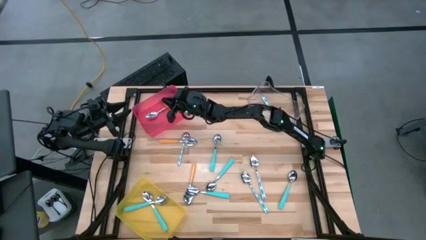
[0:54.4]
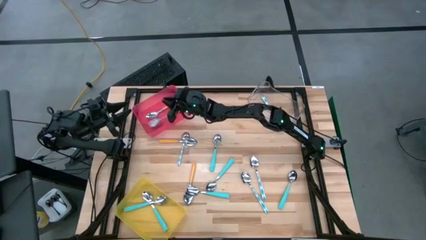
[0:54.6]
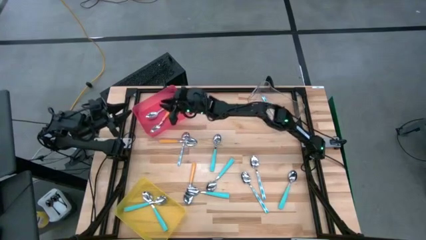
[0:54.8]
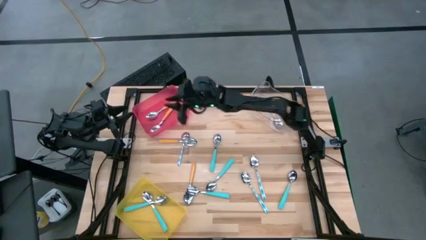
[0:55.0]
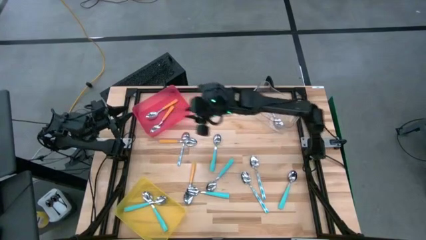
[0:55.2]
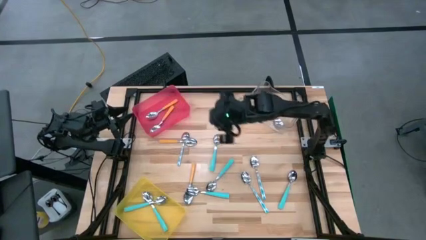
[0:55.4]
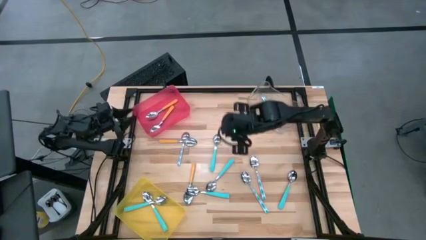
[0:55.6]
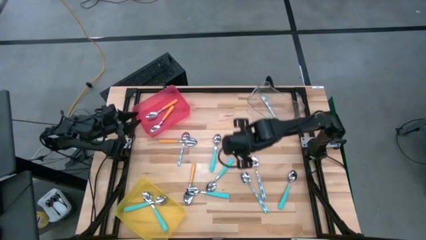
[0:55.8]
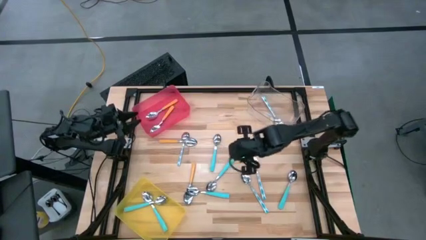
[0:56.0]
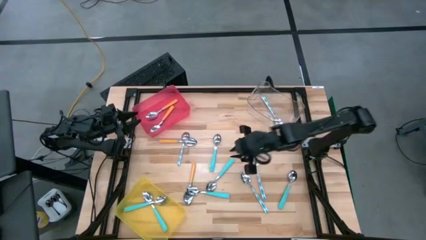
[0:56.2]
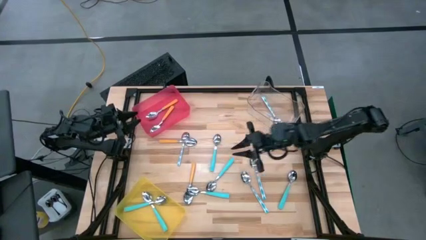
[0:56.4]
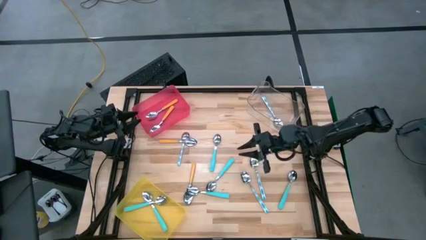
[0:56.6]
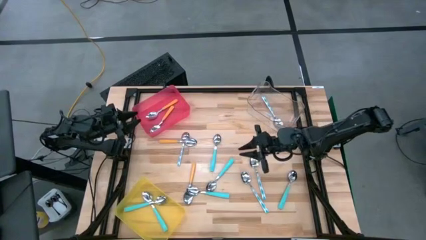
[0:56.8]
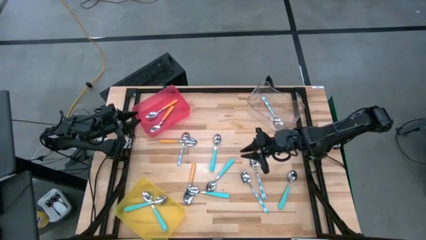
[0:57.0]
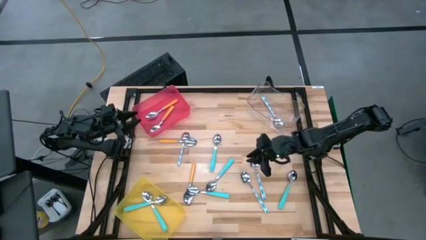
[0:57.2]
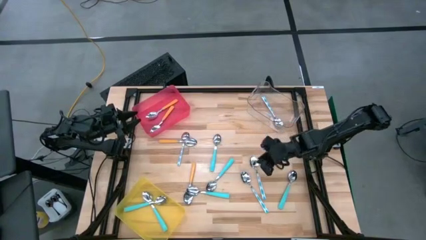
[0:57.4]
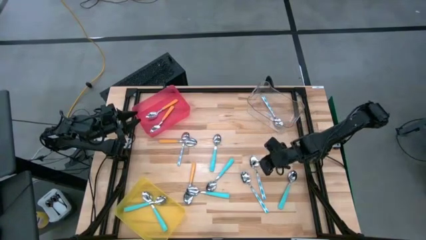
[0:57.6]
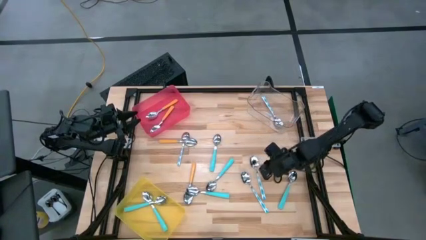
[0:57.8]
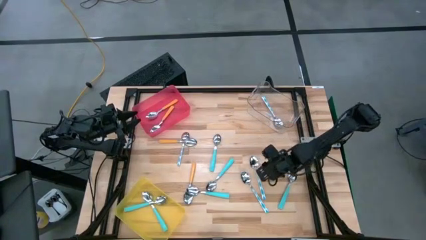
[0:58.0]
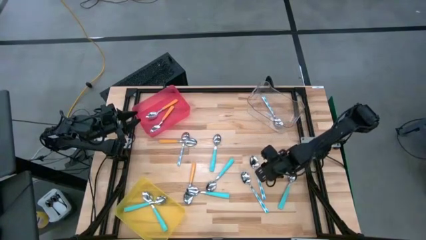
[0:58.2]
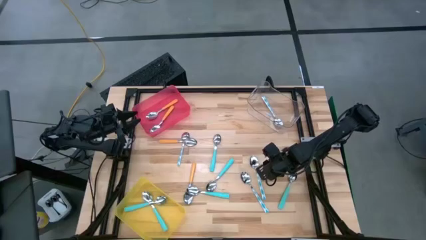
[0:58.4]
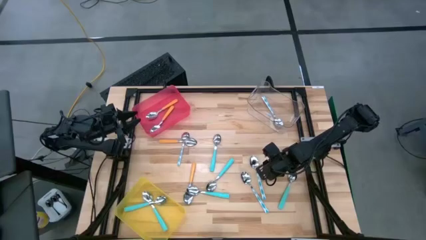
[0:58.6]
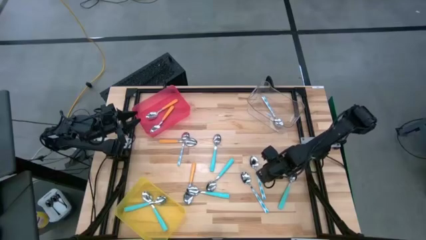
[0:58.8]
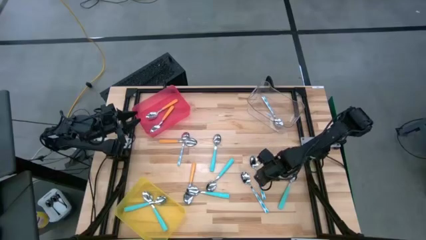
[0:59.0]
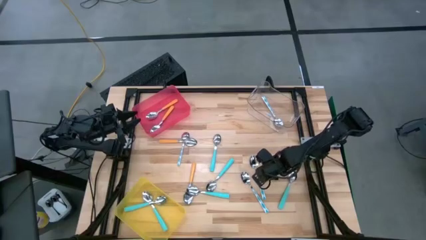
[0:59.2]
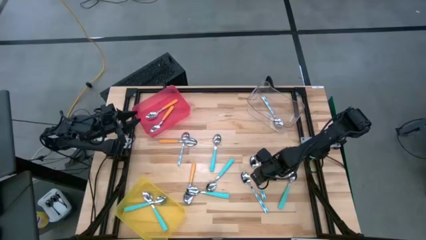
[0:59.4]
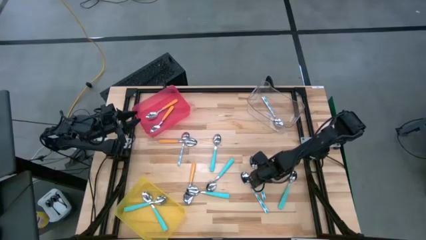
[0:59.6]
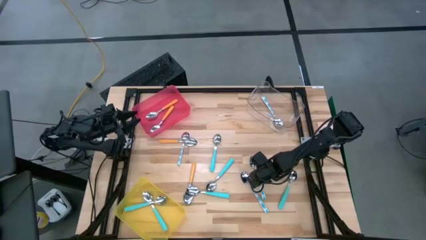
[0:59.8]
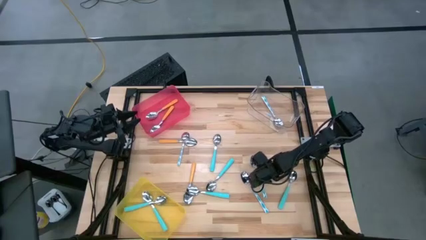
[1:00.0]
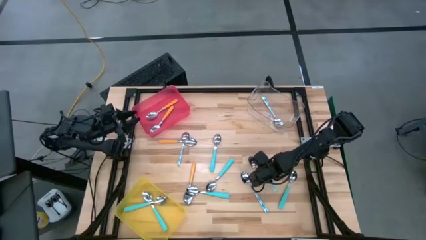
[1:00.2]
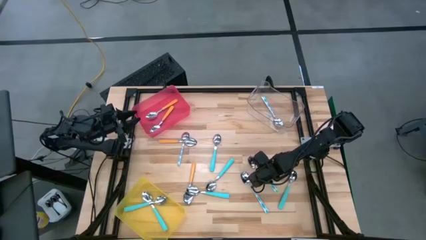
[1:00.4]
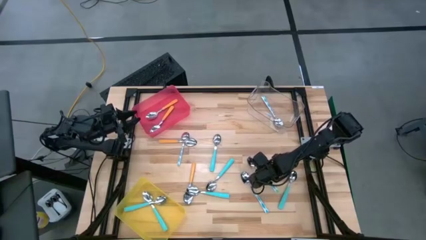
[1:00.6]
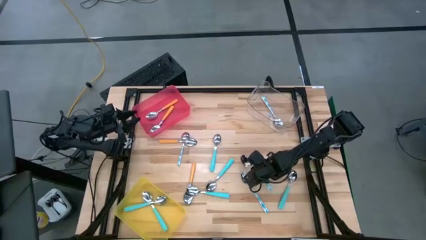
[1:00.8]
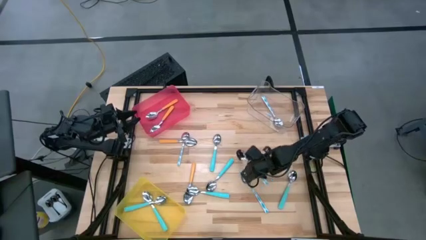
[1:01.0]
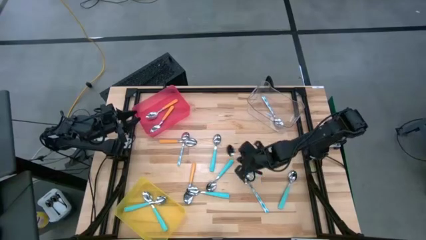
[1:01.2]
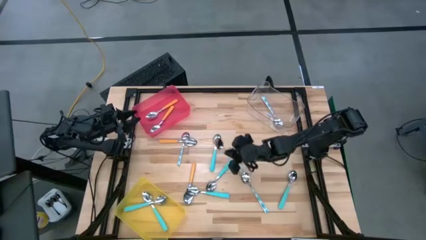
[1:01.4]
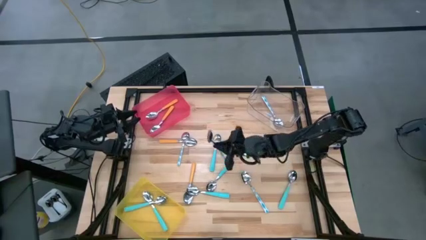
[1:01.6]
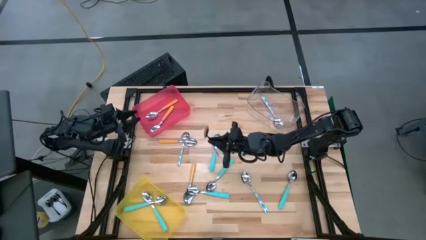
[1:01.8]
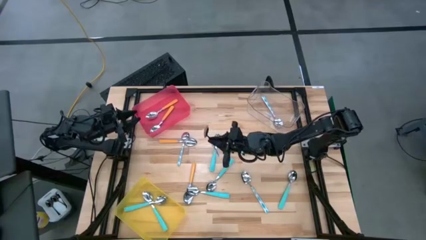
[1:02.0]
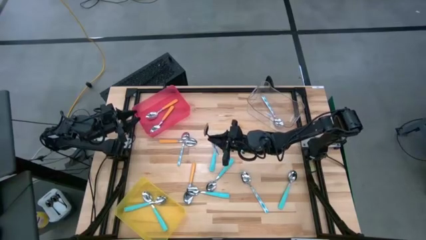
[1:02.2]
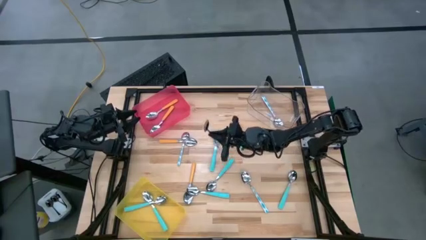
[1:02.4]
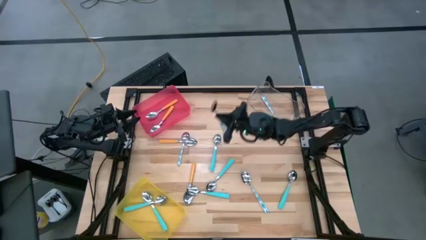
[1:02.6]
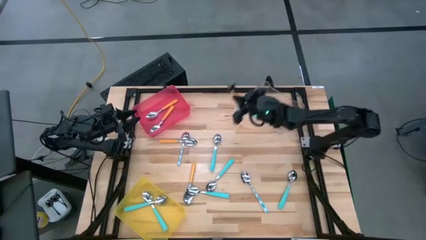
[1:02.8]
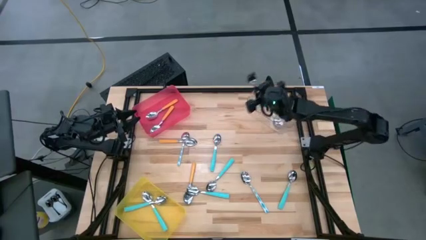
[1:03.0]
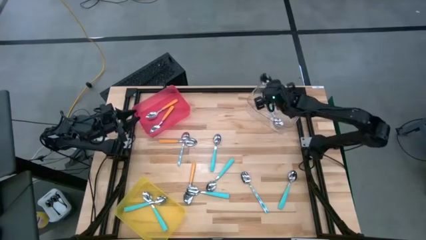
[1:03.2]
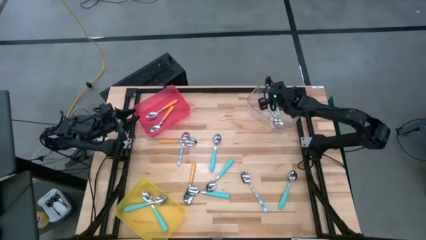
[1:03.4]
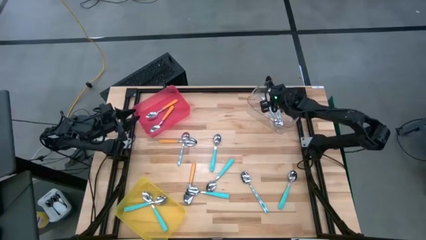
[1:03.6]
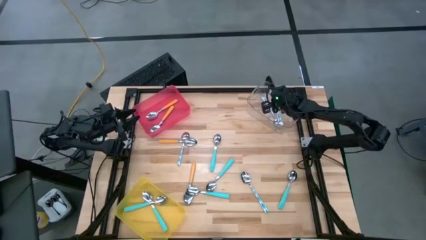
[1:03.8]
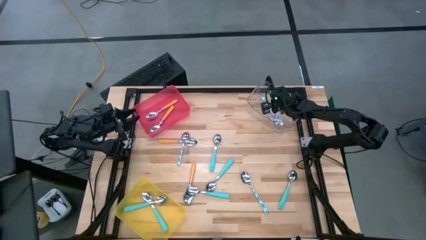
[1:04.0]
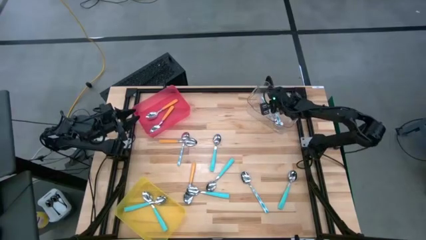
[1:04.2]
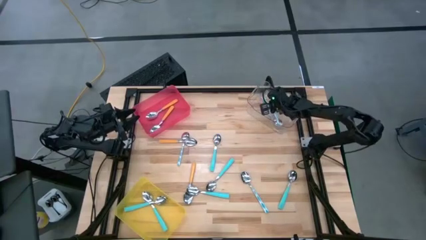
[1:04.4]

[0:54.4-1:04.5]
Task: Sort silverware by color (type)
Put the patterned blue spoon into the transparent bin

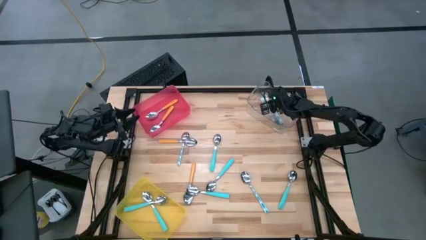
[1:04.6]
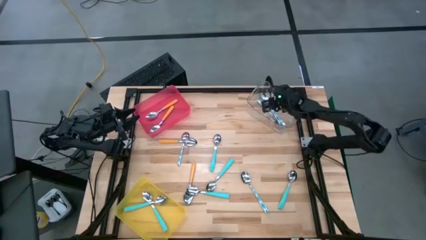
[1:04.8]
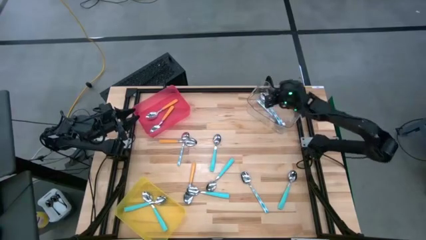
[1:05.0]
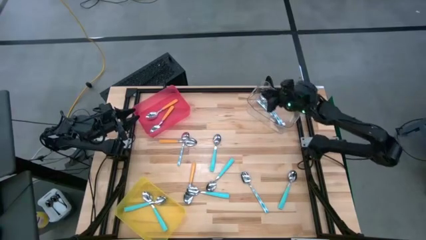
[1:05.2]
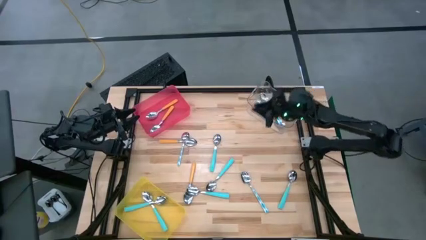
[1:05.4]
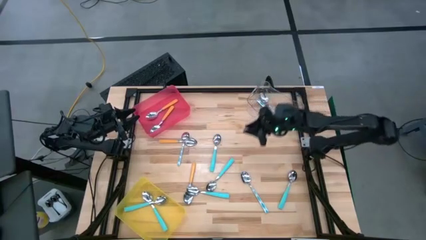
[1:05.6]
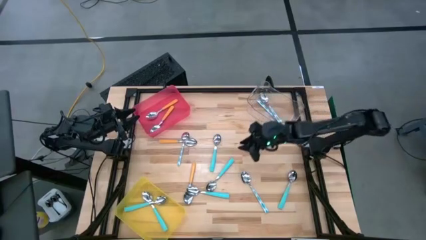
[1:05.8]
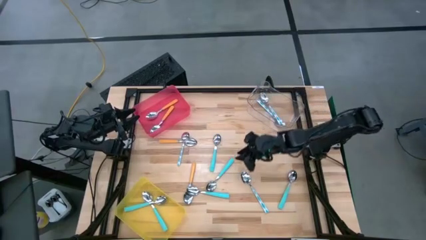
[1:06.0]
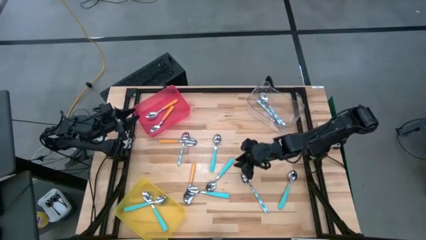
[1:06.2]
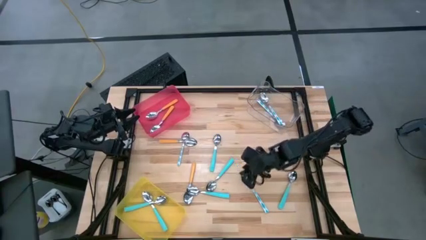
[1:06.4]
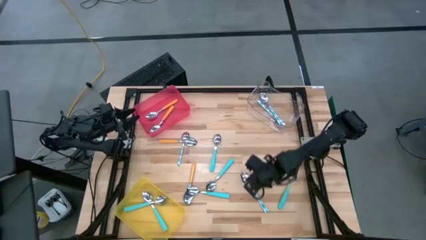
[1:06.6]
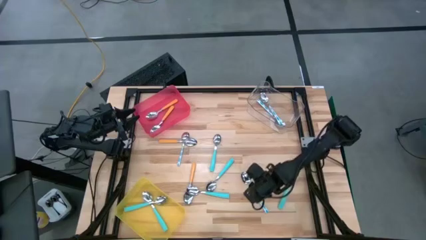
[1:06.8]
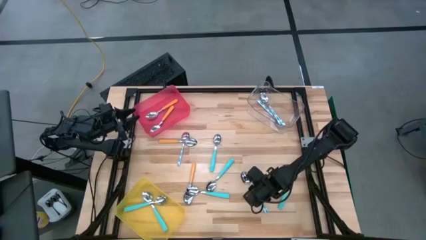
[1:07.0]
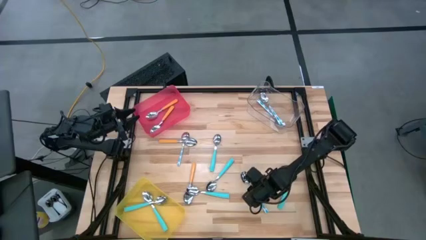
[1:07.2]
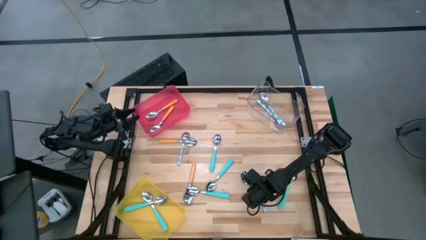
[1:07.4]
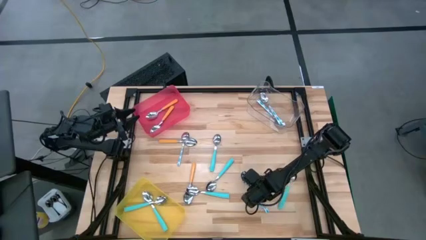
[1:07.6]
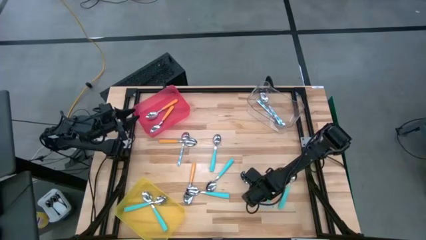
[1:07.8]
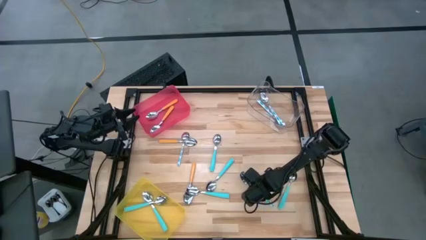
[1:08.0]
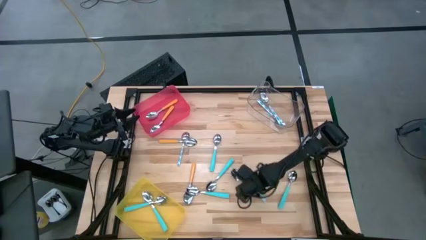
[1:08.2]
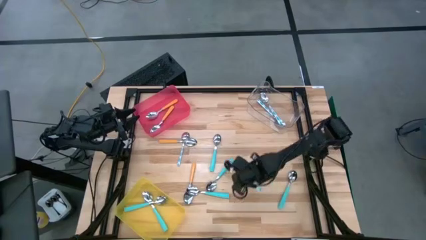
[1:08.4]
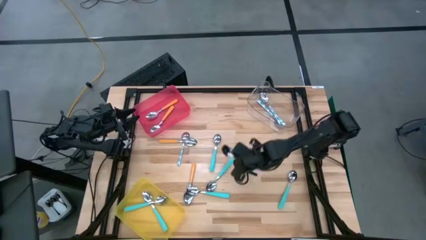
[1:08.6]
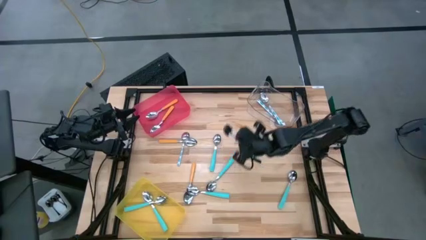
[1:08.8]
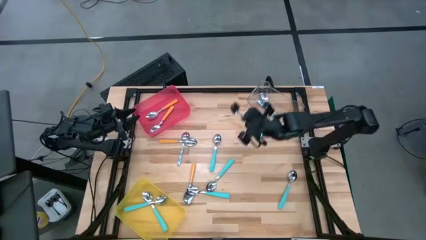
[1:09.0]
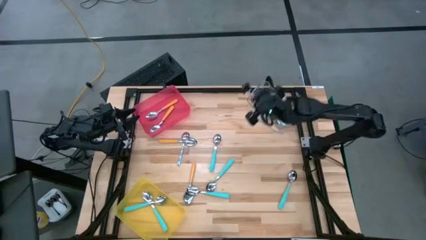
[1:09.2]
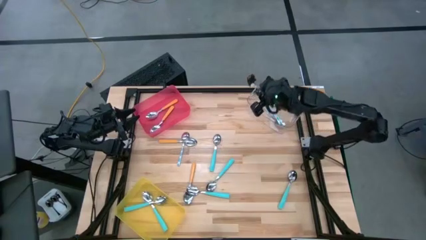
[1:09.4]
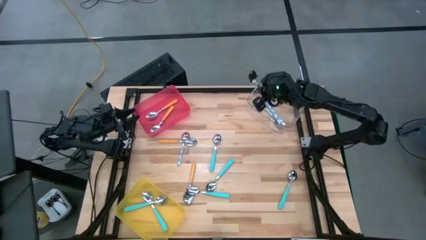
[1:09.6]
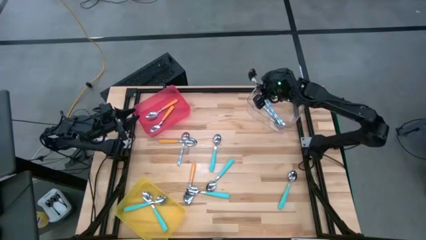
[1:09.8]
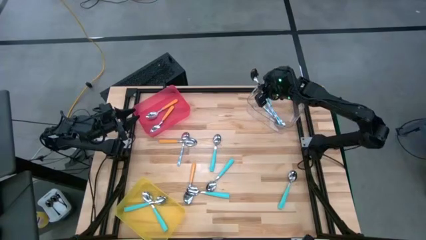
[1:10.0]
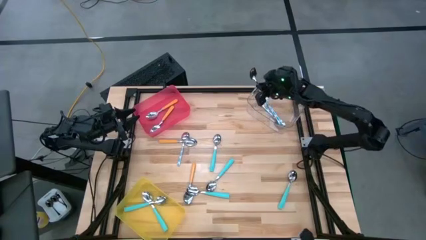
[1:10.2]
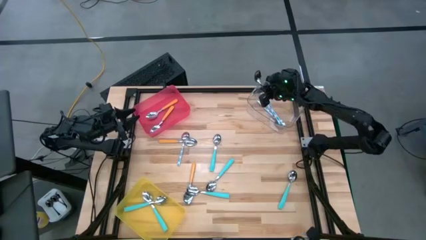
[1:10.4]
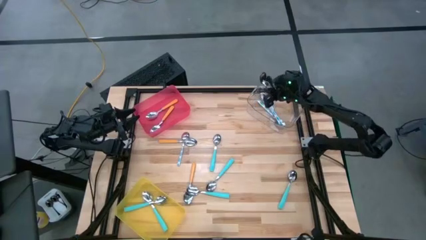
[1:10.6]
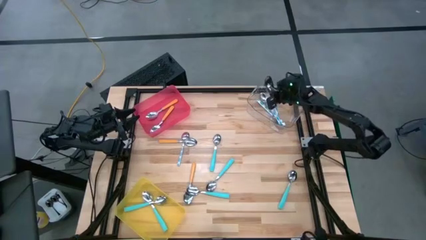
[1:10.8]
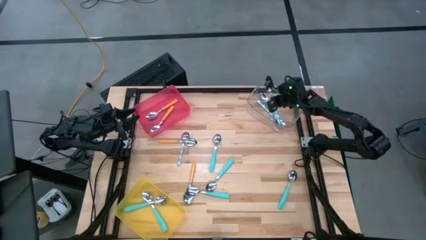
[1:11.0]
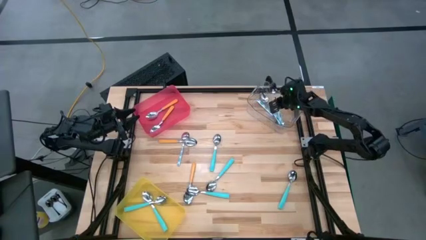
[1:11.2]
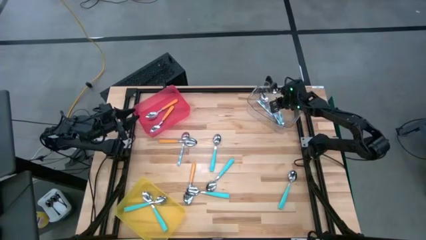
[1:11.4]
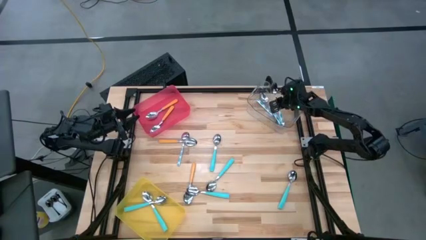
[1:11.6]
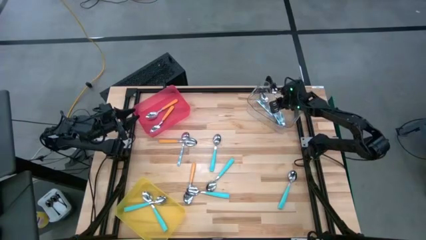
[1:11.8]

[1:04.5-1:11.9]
Put the patterned blue spoon into the transparent bin
